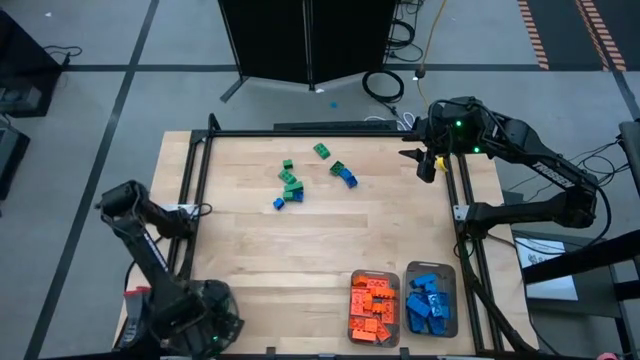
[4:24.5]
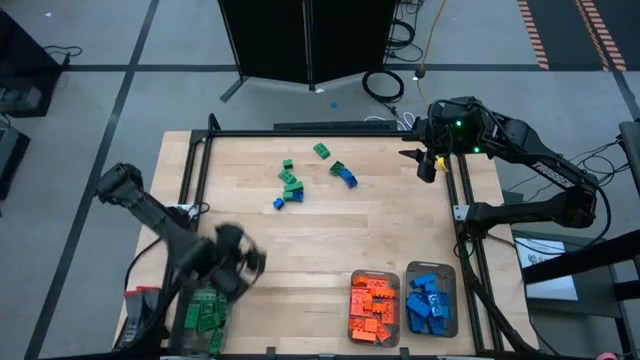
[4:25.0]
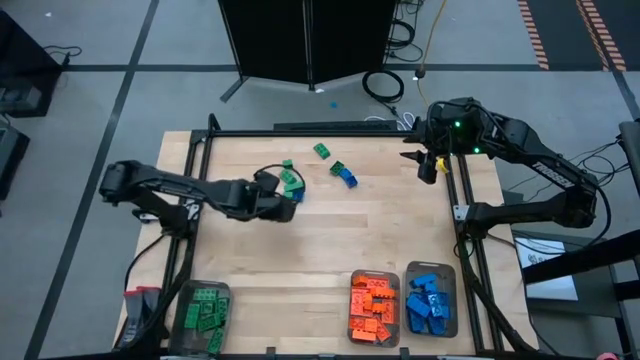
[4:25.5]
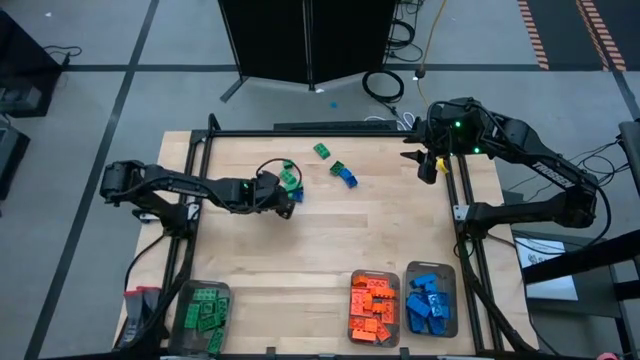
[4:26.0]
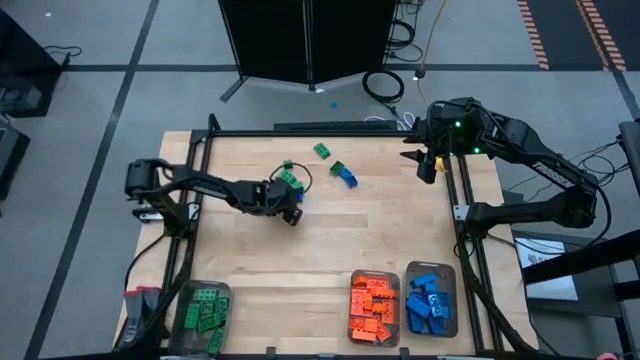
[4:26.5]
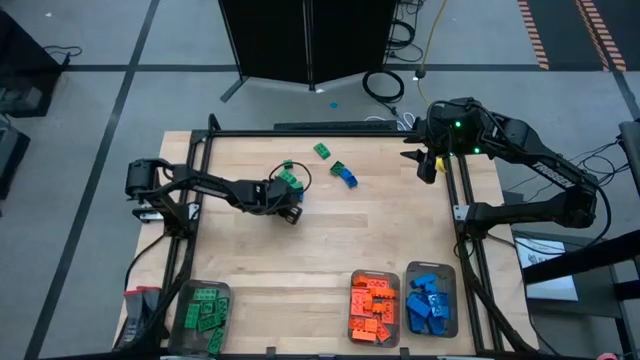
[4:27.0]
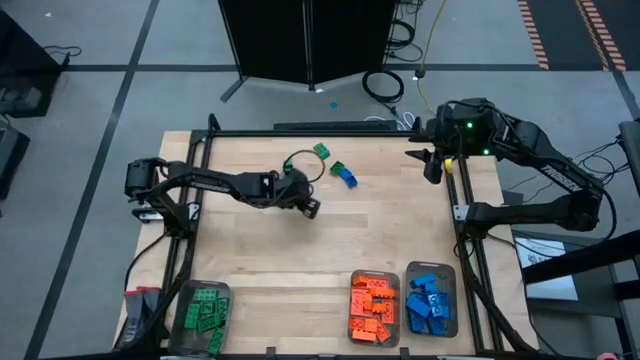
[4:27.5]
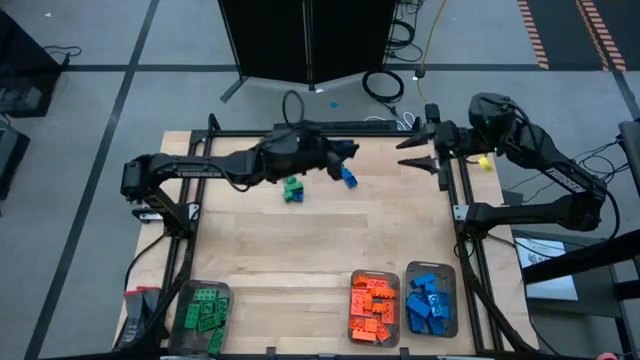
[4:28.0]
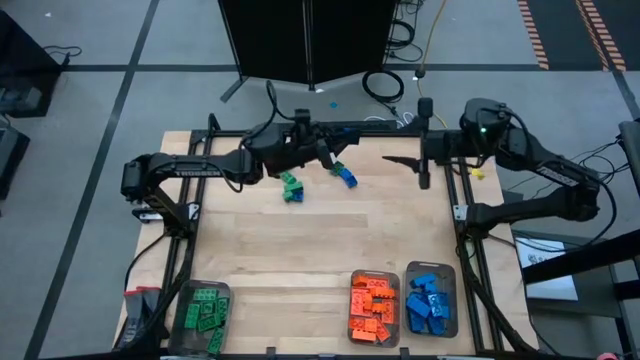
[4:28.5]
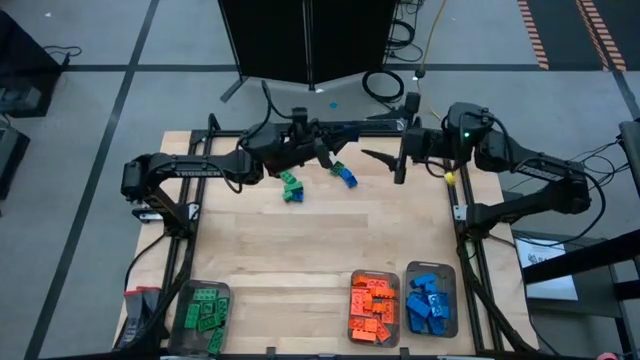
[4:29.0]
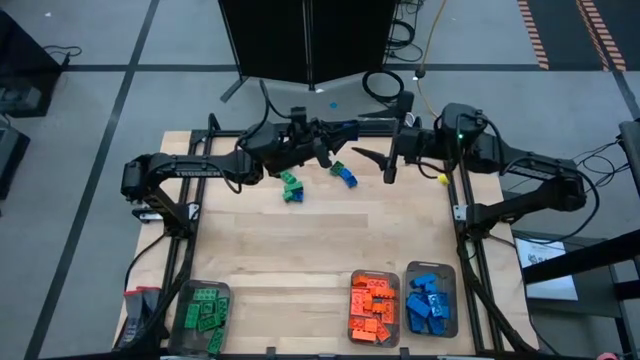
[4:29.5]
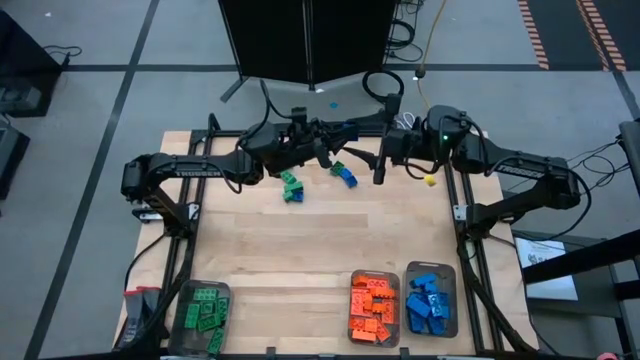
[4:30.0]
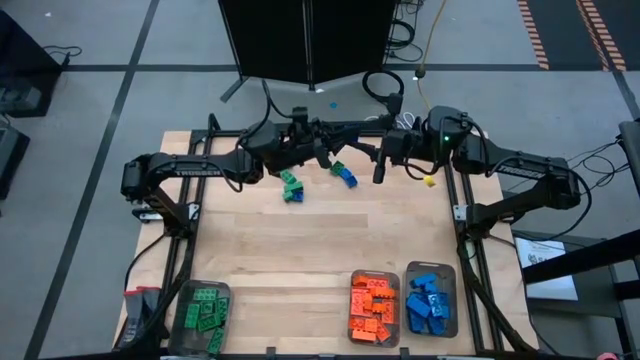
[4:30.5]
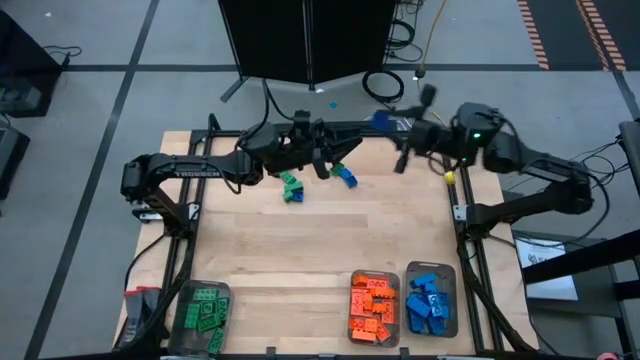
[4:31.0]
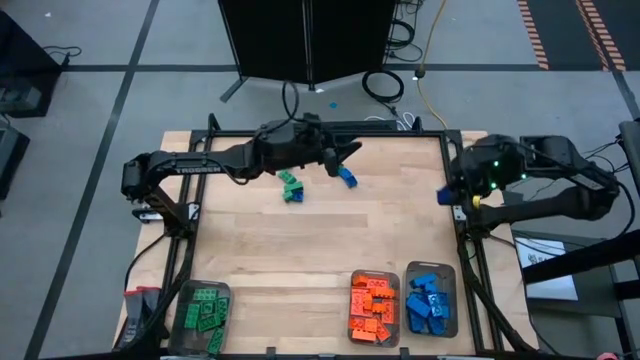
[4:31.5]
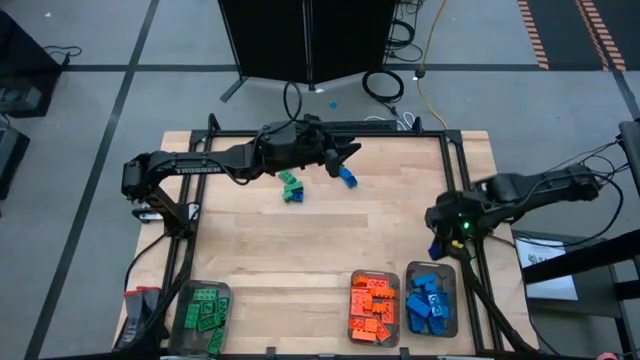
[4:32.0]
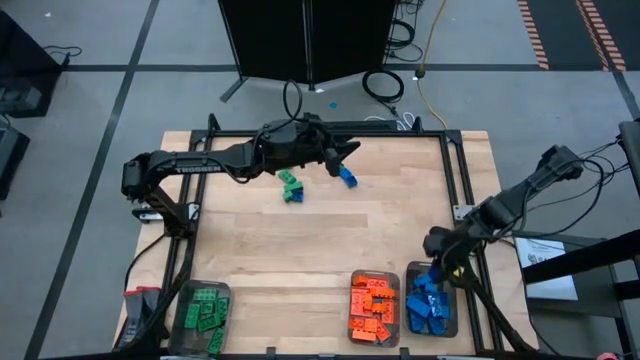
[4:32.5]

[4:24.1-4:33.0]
Task: Sort blocks
Put the blue game piece into the right black bin

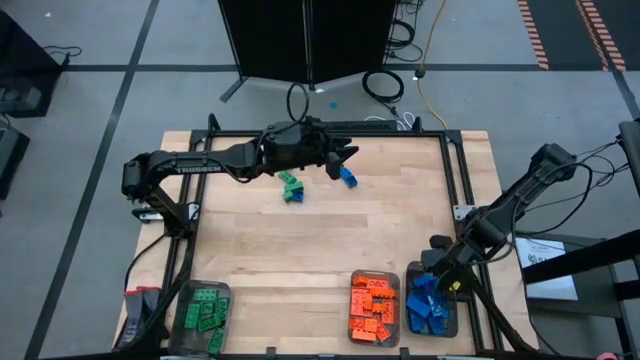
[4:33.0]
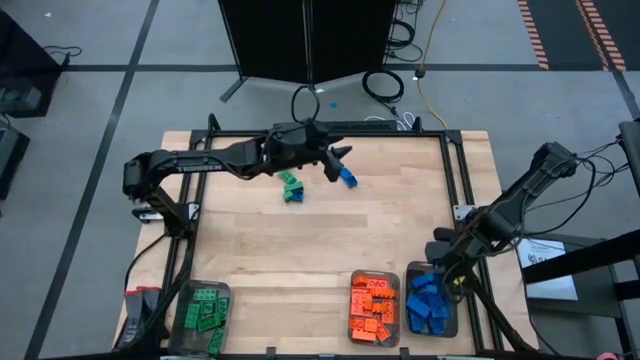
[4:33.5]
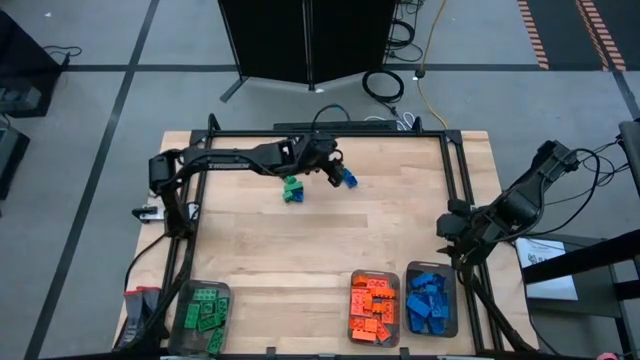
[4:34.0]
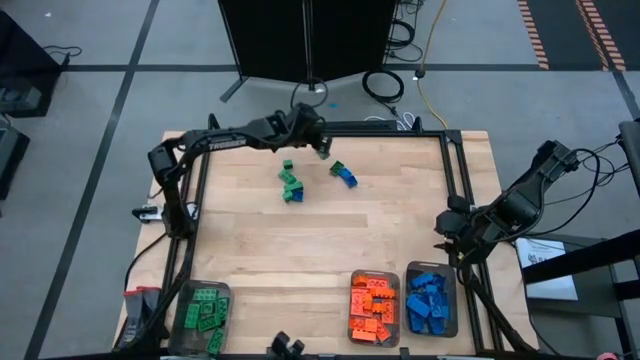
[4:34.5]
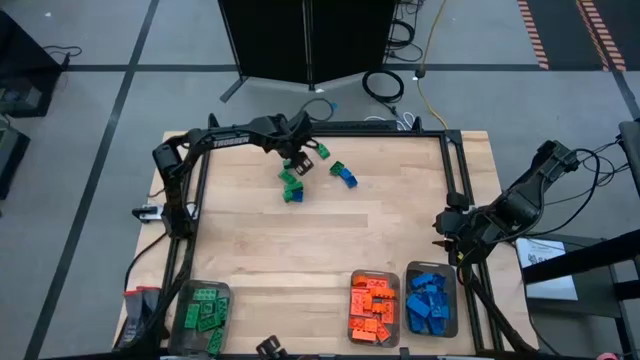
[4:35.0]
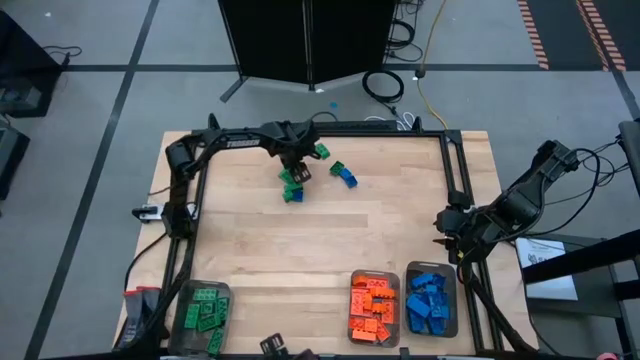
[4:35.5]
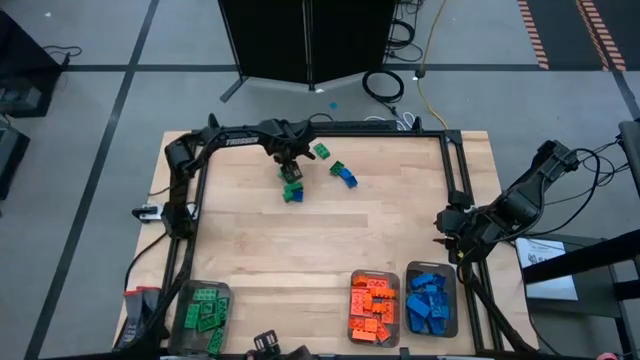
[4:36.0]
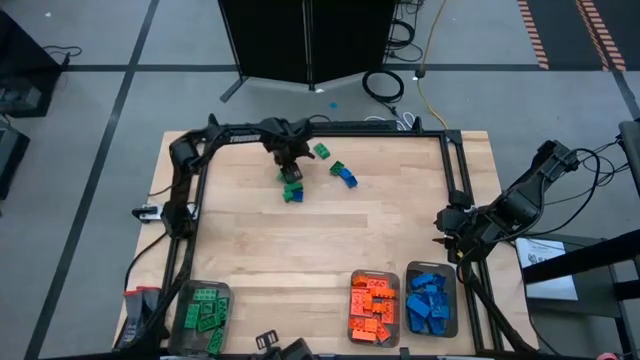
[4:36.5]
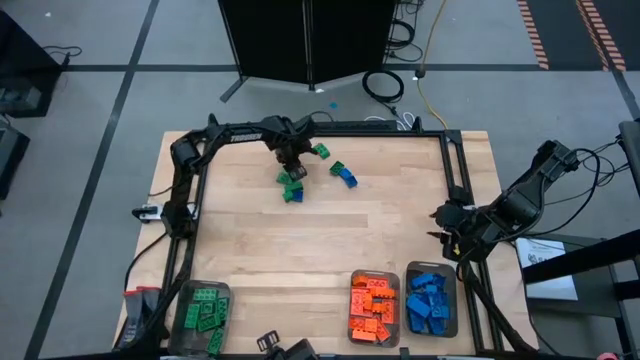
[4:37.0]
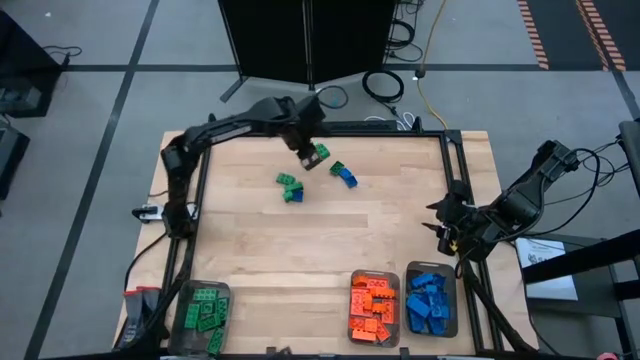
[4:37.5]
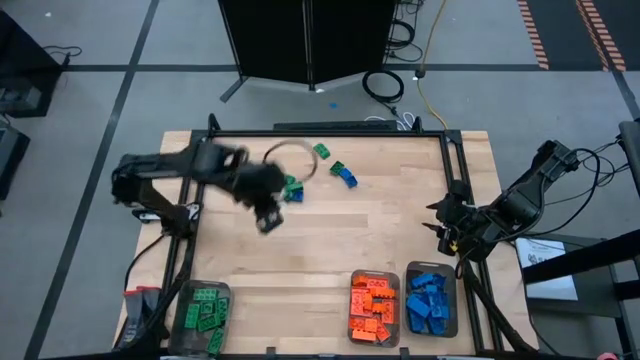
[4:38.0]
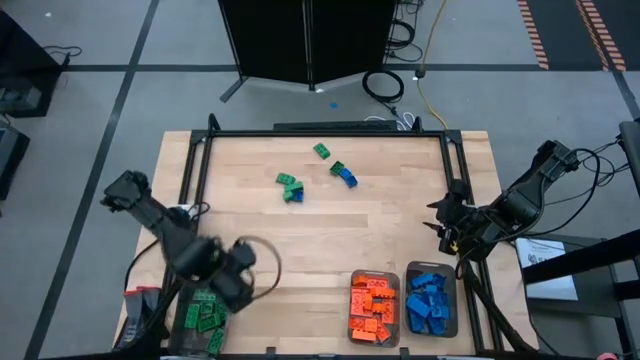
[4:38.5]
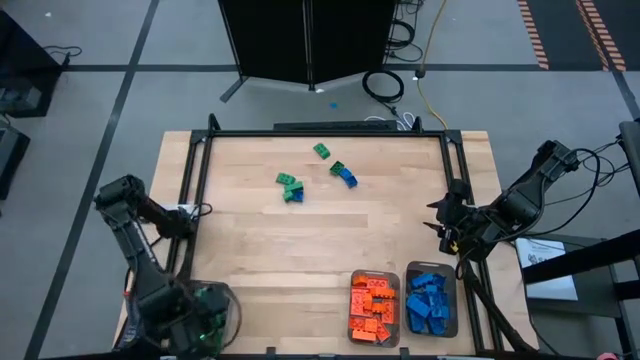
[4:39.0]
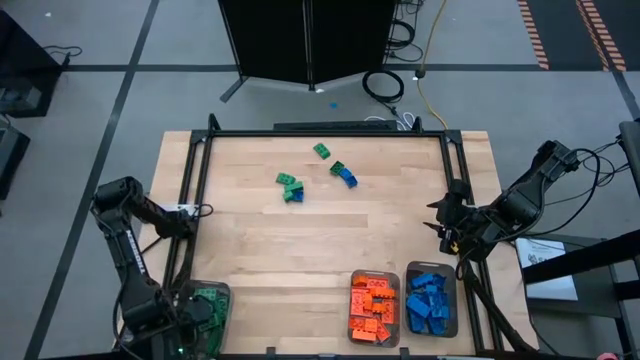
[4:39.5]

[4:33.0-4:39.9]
Put the green game piece into the left black bin

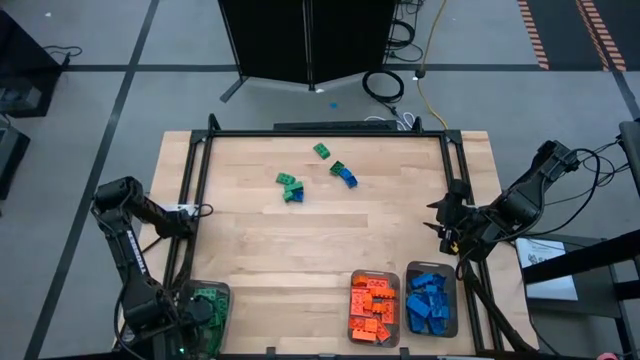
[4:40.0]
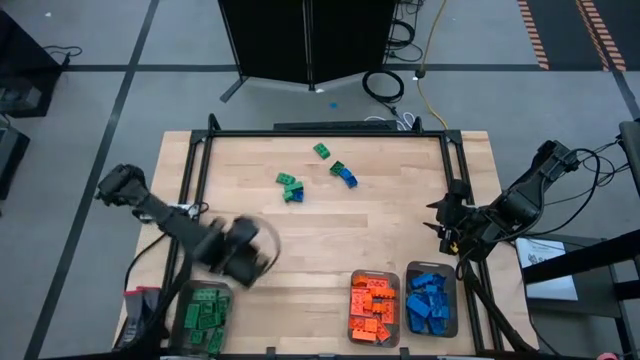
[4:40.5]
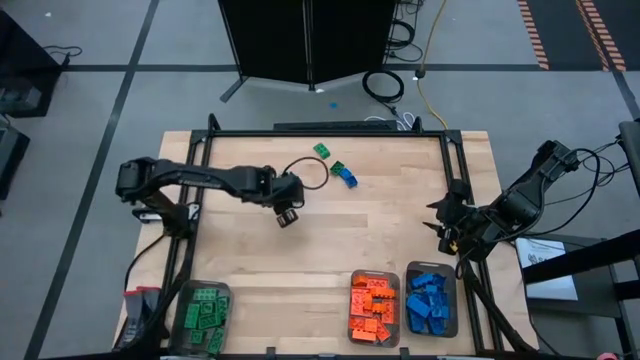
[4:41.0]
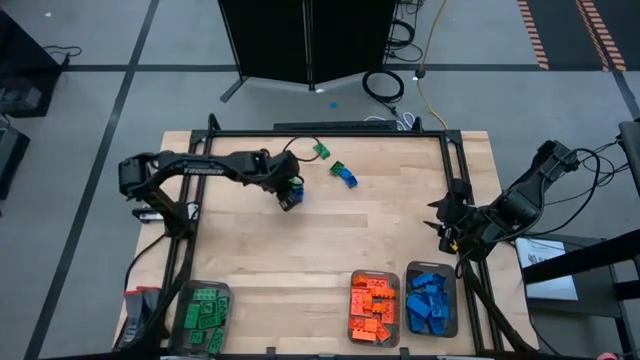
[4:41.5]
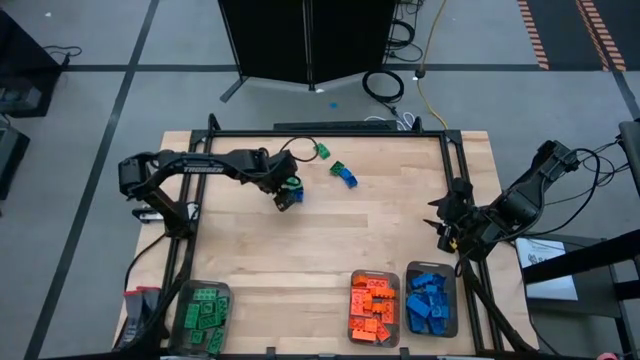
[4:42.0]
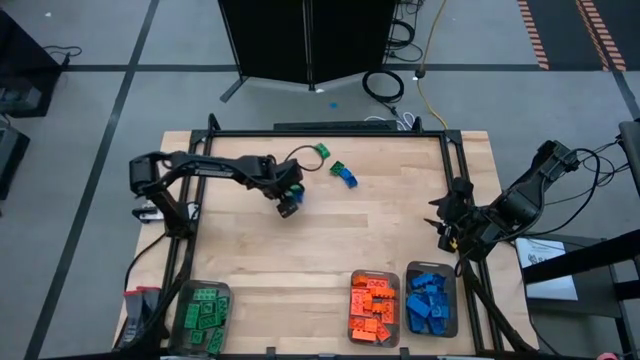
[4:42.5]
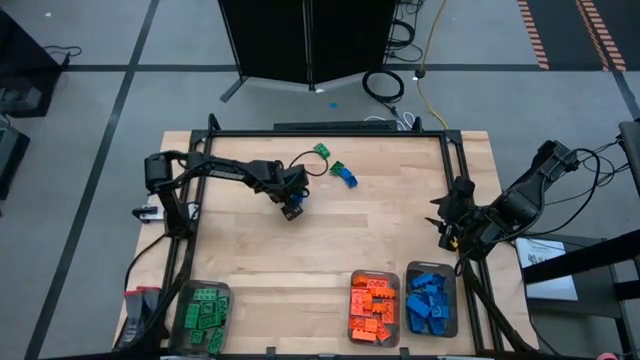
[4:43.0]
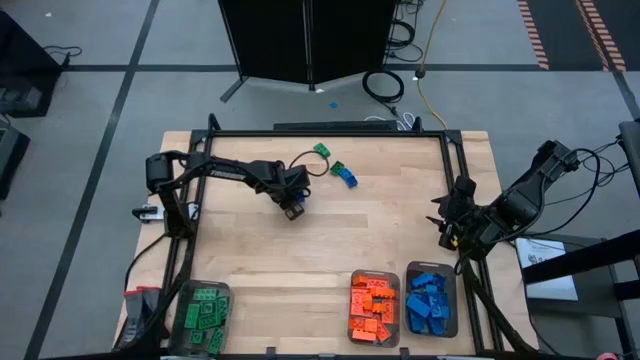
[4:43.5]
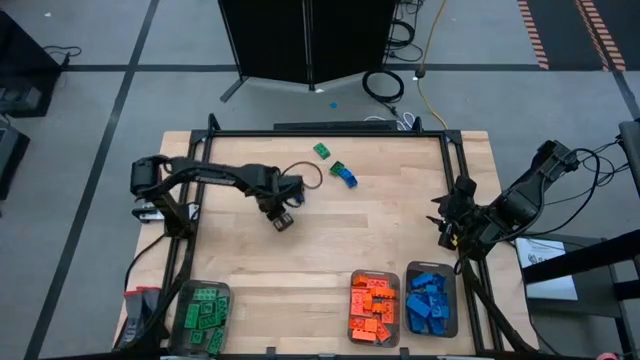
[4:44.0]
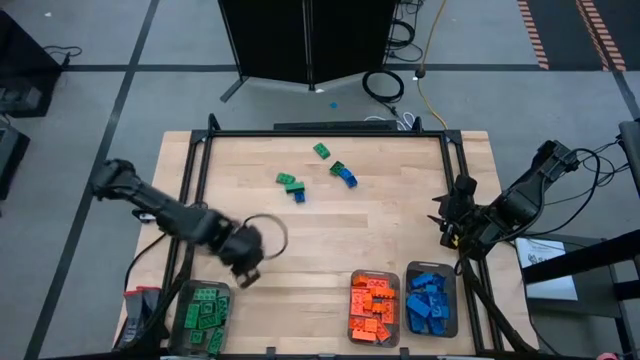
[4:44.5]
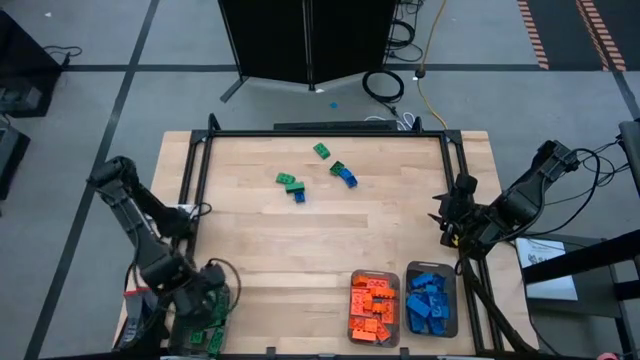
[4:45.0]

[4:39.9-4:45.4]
Put the green game piece into the left black bin
